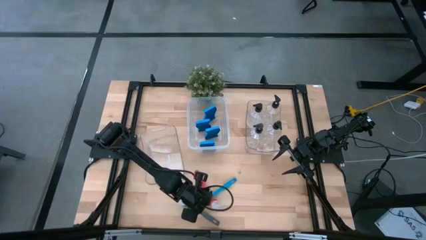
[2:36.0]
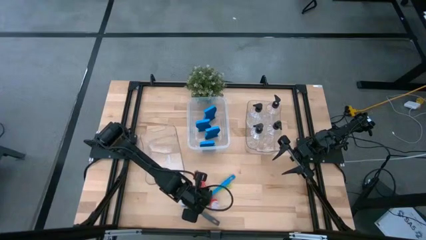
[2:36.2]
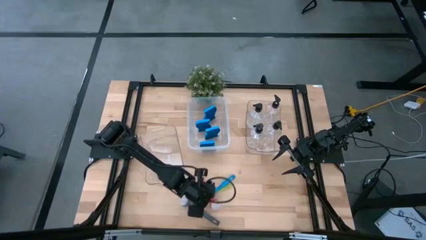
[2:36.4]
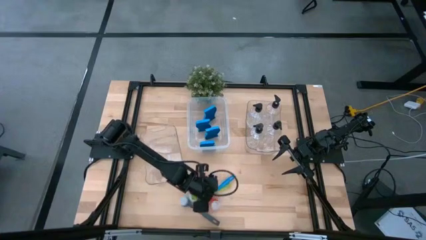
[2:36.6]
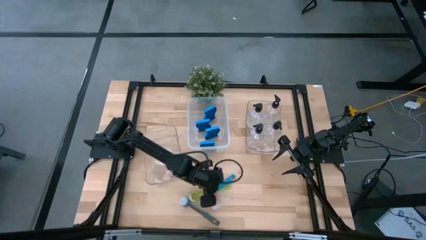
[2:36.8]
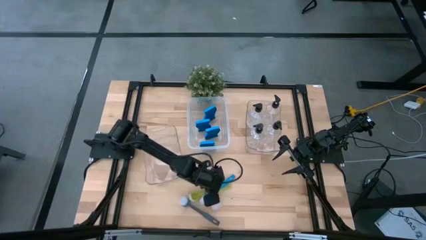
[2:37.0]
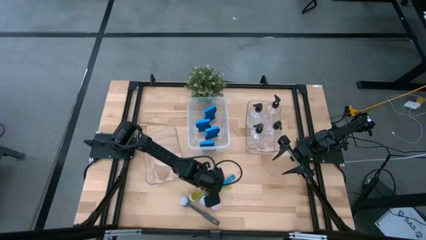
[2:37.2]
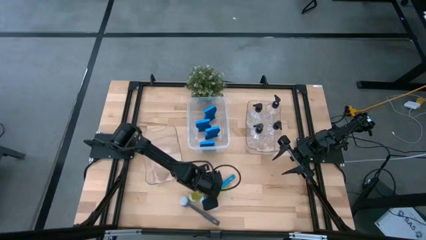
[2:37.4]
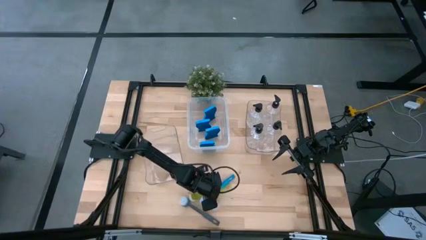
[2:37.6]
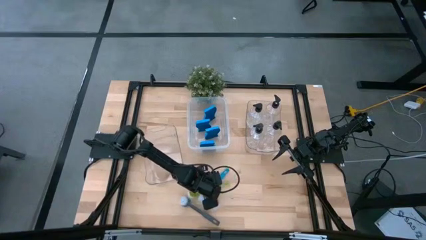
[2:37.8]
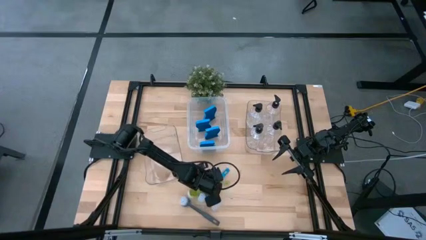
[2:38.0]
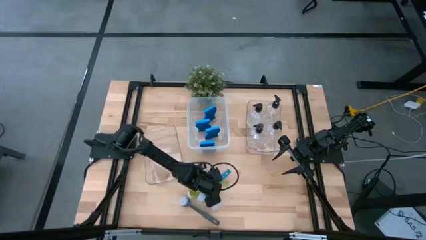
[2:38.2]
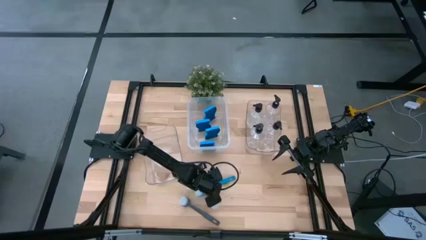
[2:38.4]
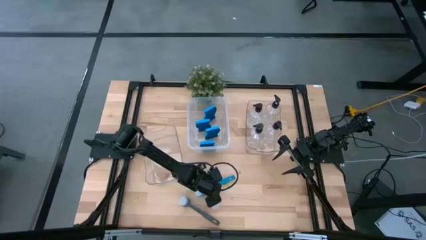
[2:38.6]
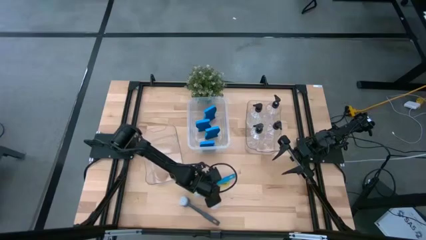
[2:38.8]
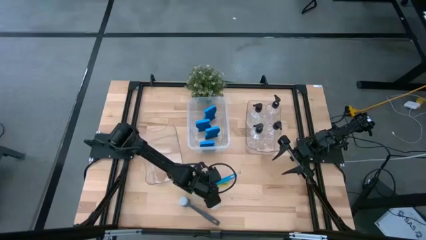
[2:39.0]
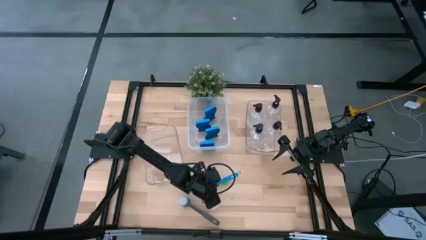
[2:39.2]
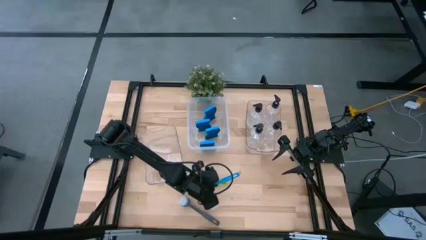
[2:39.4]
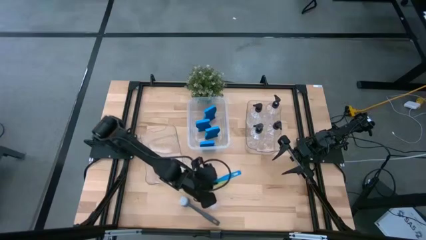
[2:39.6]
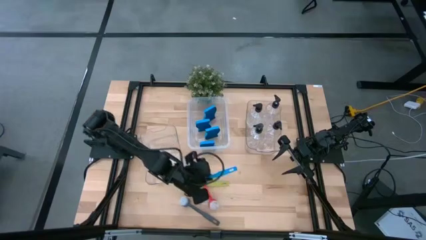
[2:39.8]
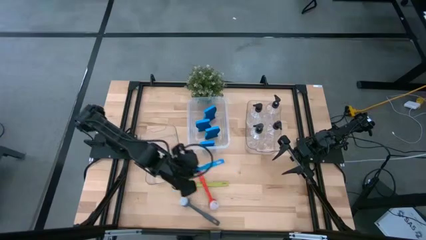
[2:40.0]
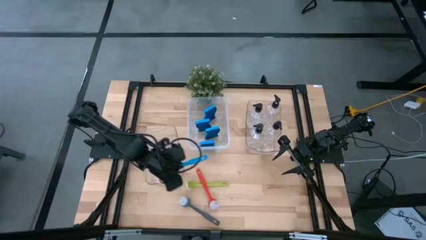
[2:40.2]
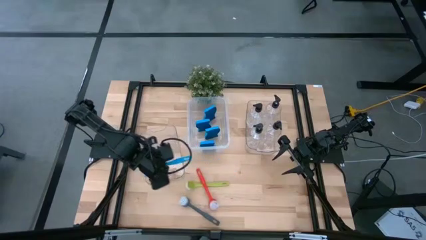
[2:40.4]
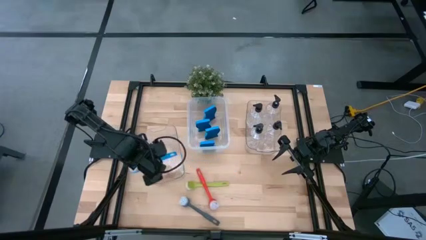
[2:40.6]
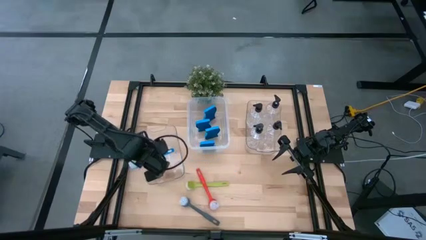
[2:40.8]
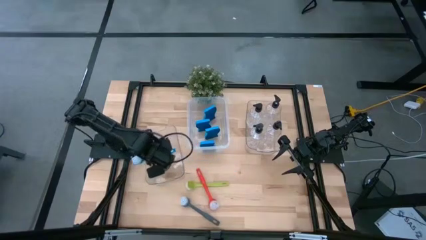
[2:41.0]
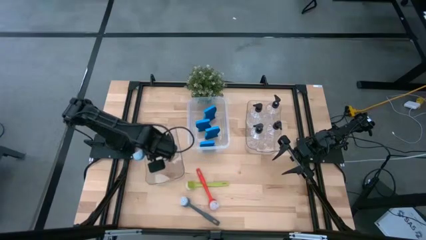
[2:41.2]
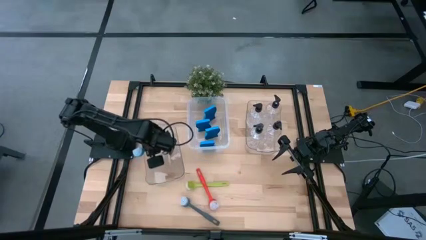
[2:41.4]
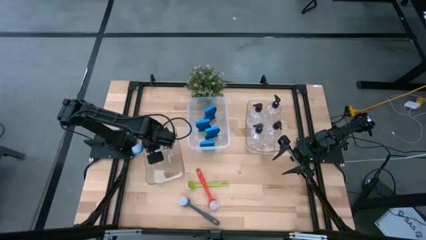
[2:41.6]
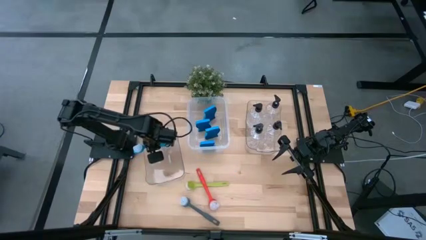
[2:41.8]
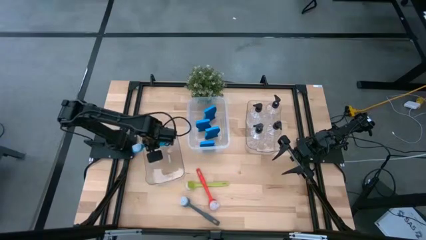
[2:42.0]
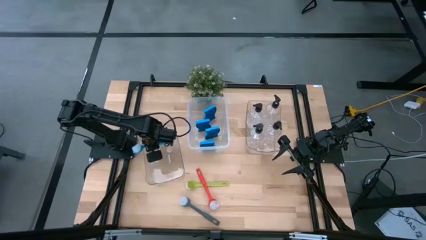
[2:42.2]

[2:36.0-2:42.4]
Task: Pick & Place Kitchen Sink Supplies
Put the blue brush into the left transparent bin

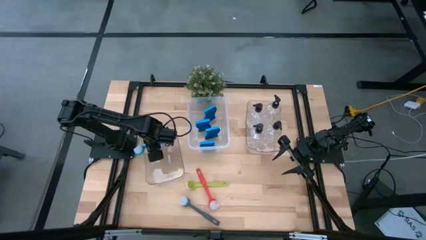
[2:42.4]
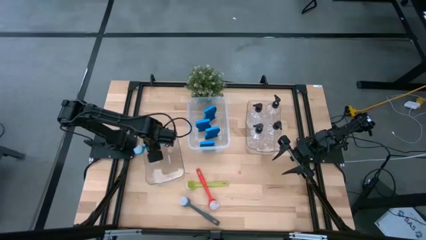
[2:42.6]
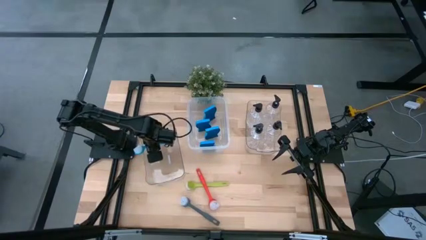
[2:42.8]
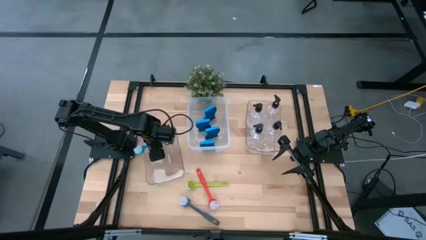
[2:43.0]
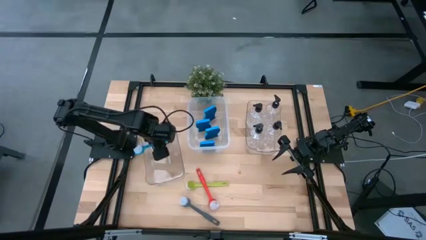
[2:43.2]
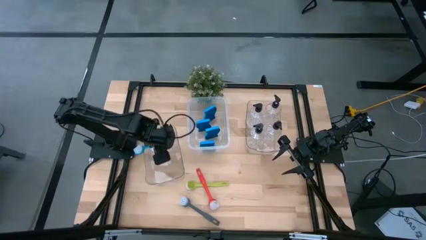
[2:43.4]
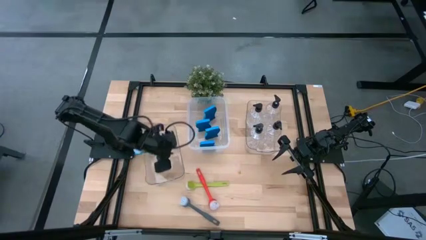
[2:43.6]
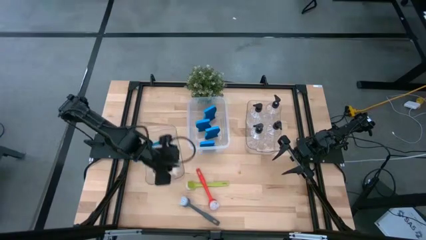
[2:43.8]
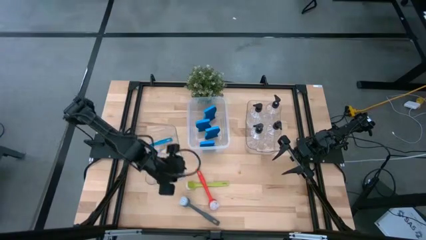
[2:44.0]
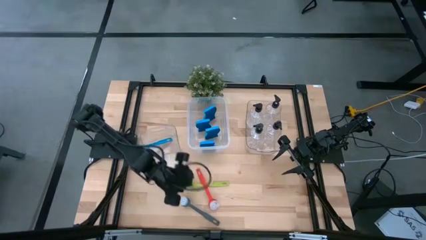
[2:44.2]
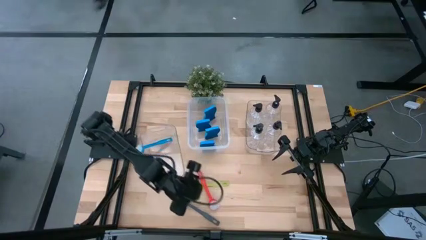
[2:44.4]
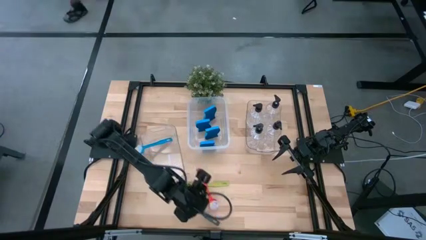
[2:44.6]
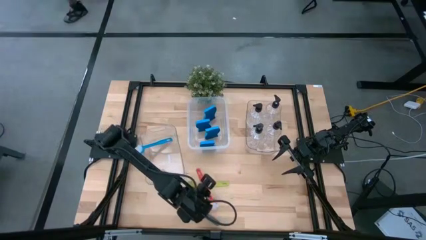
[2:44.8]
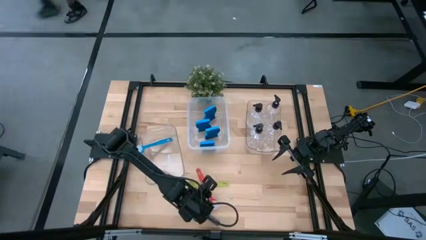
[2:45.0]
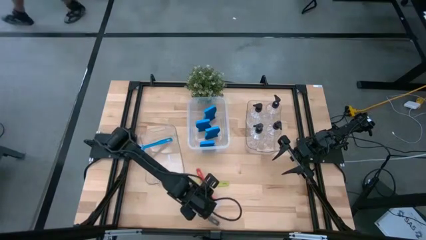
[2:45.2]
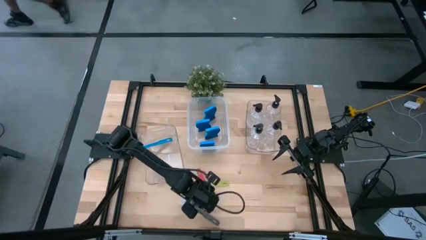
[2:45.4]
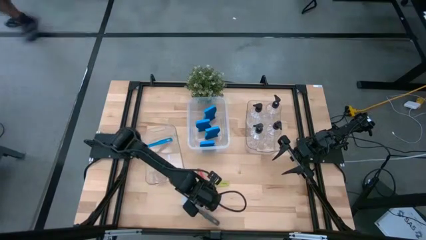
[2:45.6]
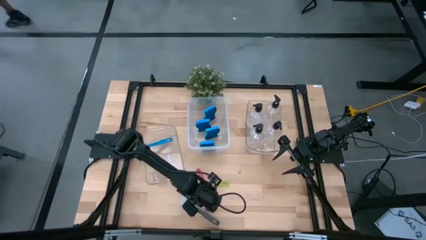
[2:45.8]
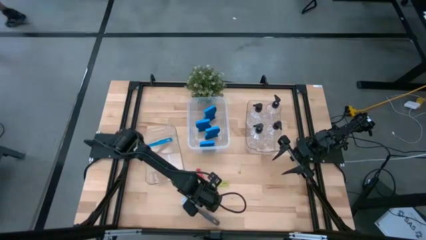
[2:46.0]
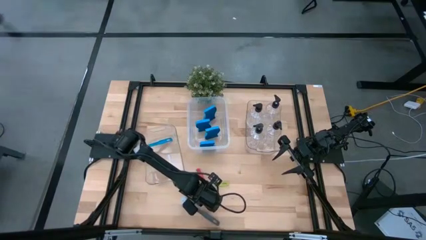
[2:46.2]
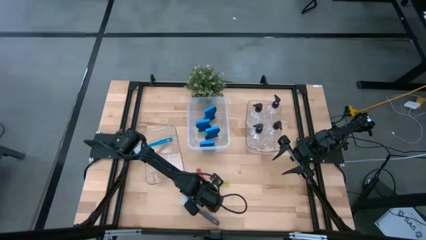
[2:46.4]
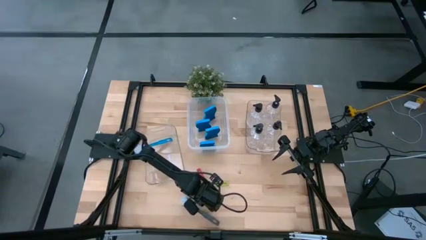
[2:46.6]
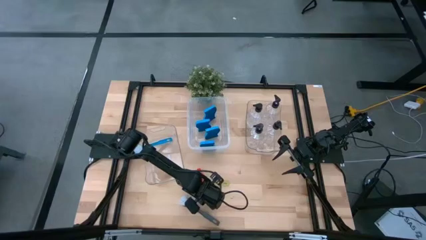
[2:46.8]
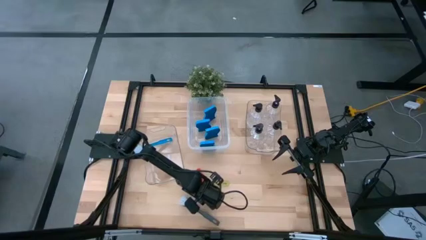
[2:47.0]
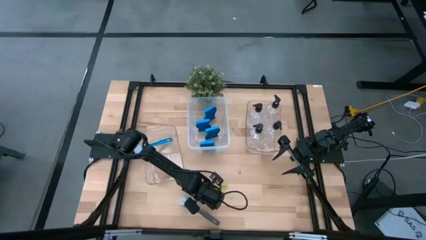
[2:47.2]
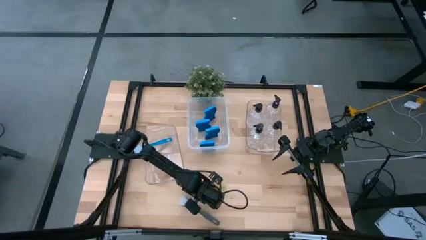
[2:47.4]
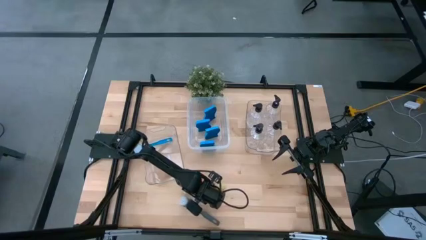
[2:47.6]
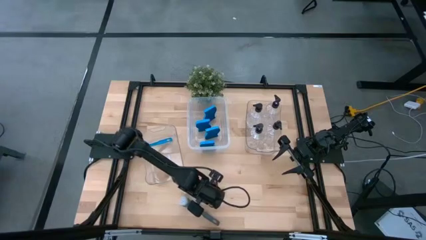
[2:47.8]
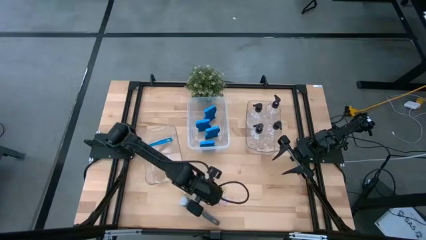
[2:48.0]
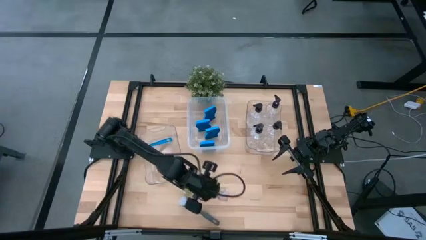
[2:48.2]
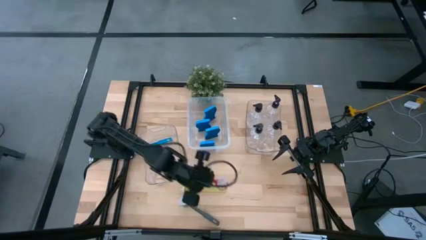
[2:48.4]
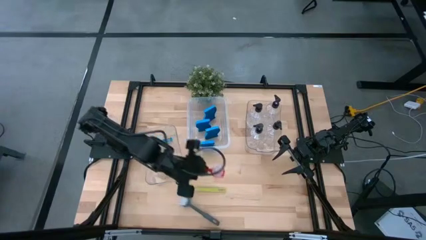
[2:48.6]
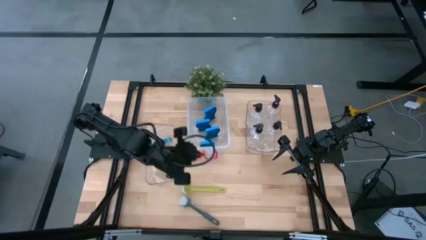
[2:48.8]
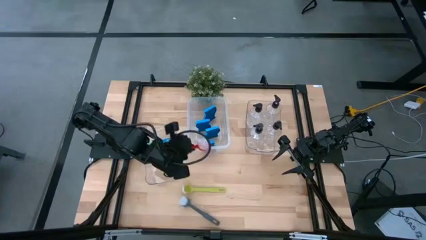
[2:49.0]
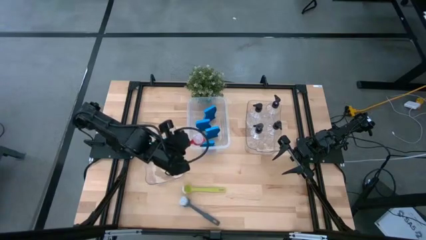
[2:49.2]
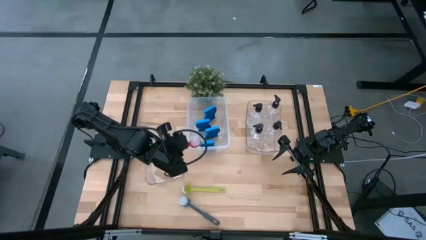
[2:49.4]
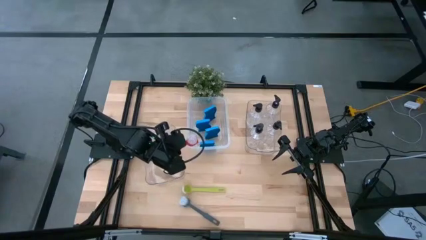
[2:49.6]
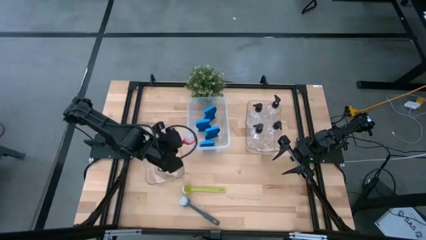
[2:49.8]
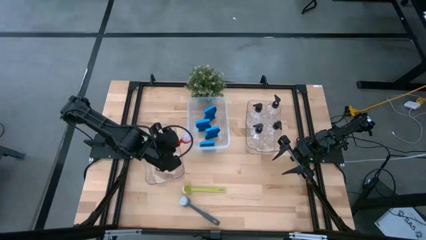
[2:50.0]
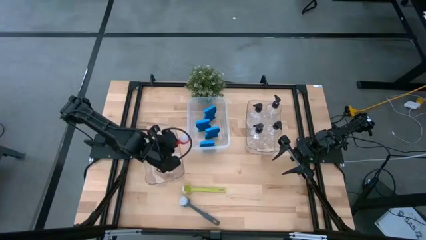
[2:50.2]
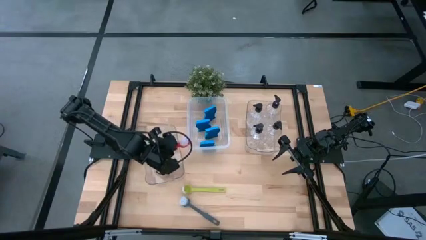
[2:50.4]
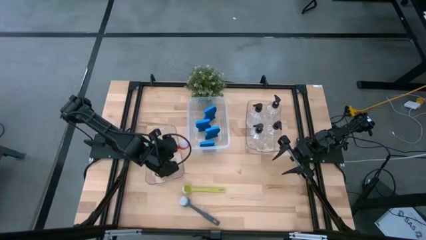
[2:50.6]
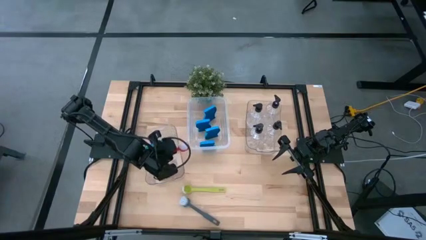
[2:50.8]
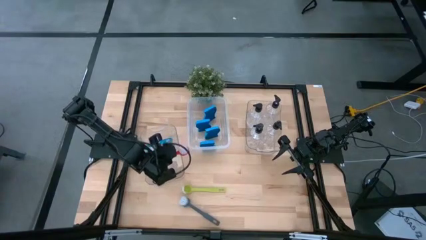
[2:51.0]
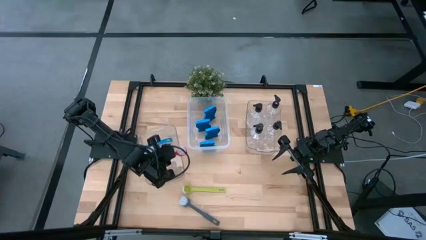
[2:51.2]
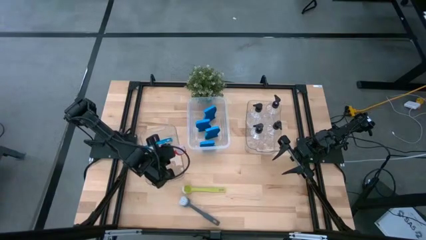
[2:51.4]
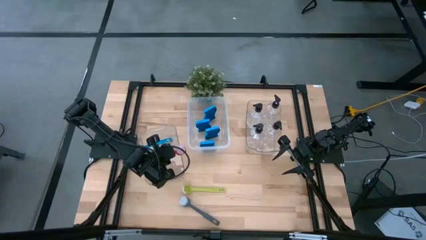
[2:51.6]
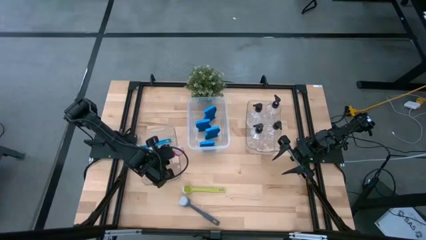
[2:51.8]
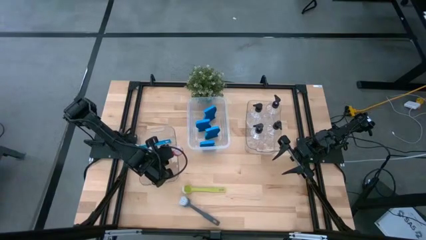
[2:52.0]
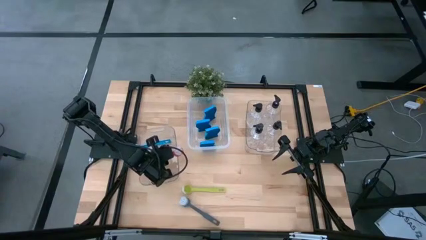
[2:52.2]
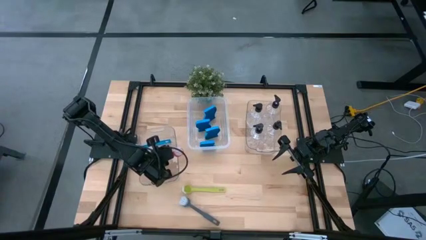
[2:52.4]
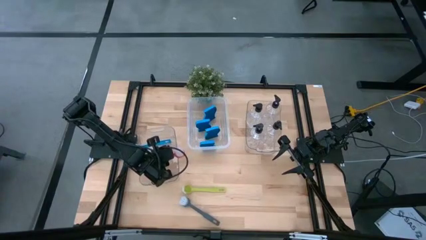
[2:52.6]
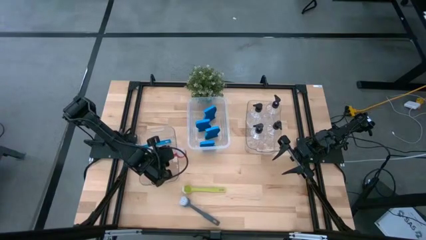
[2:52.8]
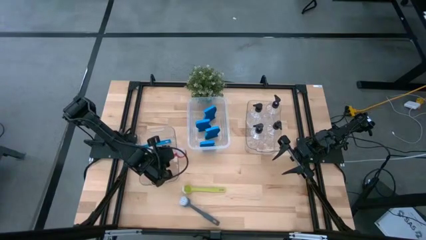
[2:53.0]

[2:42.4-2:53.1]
Put the orange brush into the left transparent bin
